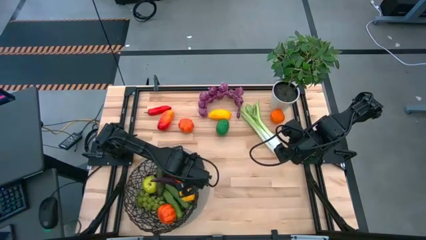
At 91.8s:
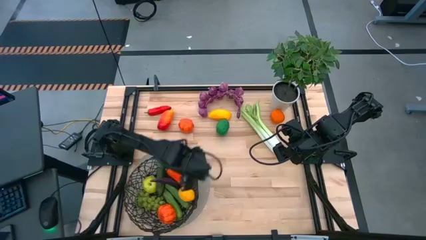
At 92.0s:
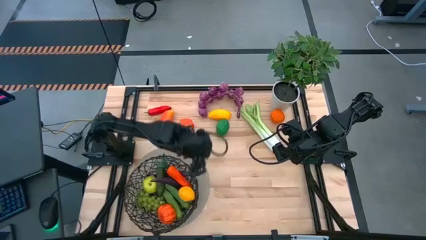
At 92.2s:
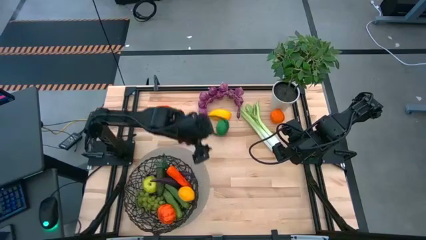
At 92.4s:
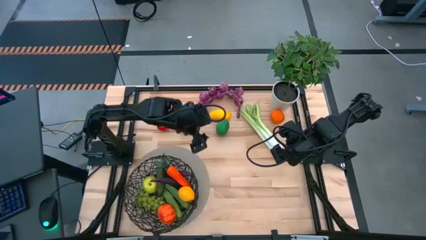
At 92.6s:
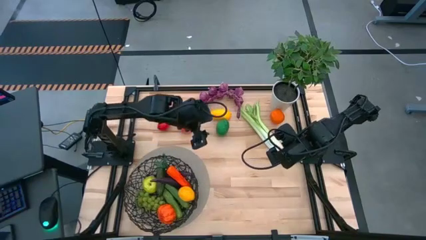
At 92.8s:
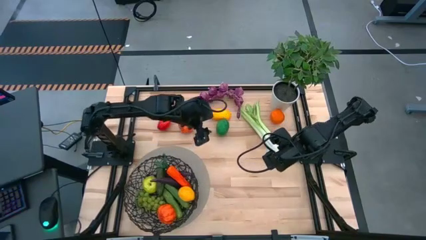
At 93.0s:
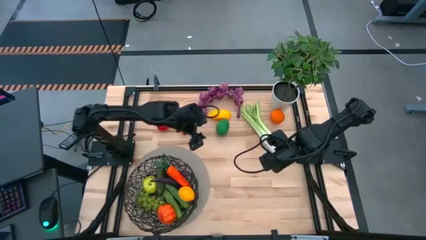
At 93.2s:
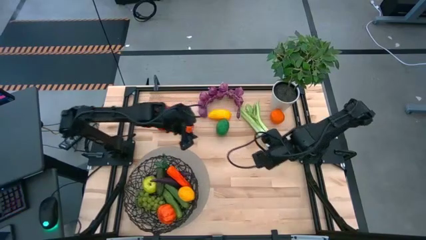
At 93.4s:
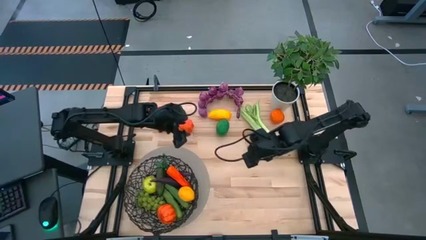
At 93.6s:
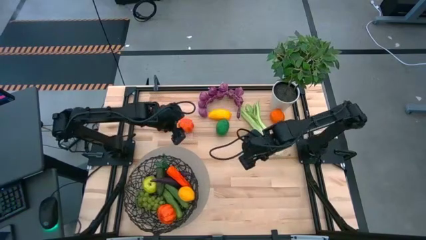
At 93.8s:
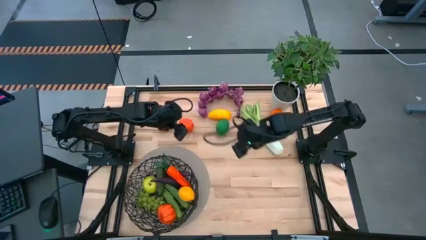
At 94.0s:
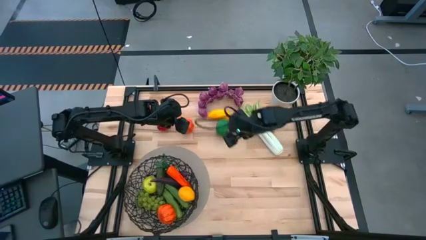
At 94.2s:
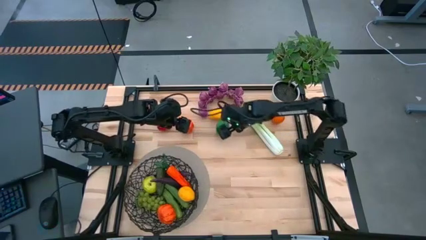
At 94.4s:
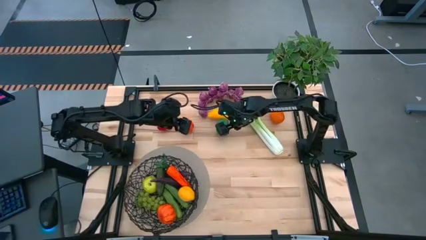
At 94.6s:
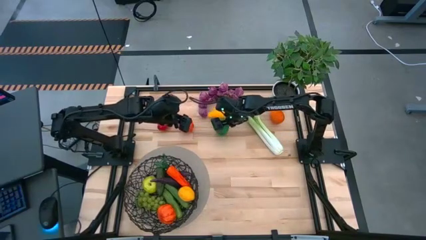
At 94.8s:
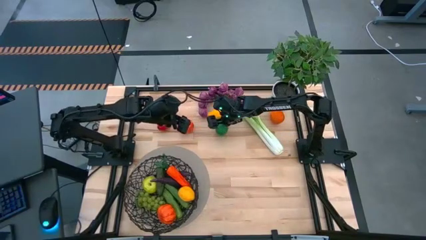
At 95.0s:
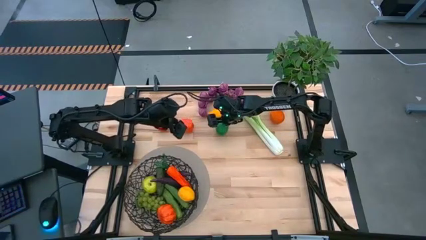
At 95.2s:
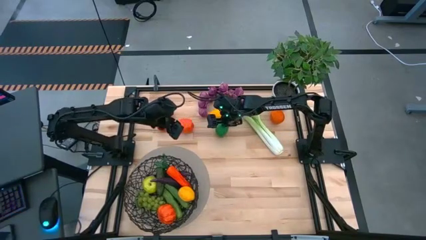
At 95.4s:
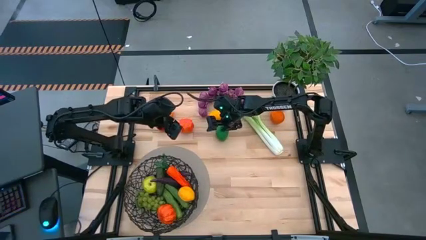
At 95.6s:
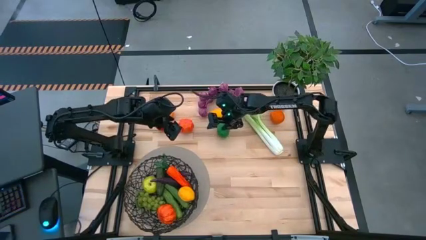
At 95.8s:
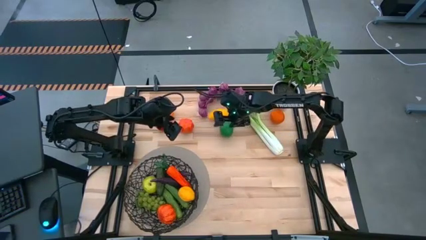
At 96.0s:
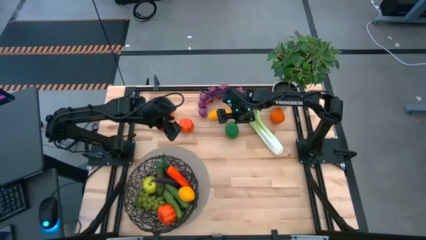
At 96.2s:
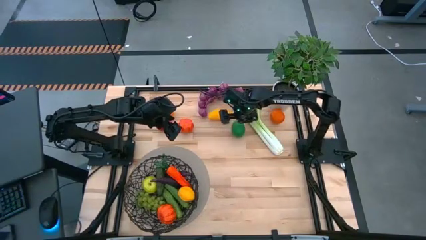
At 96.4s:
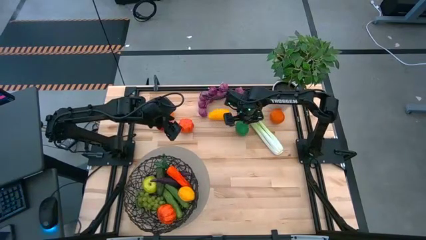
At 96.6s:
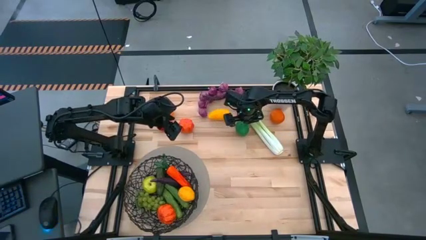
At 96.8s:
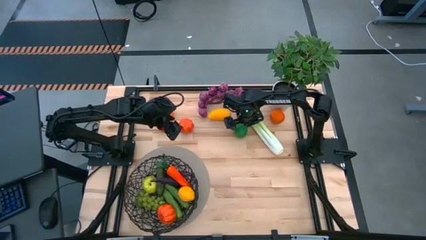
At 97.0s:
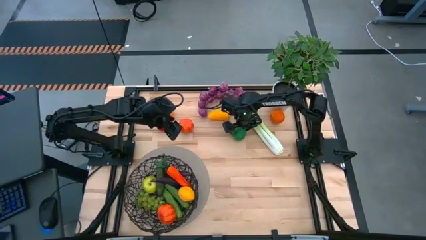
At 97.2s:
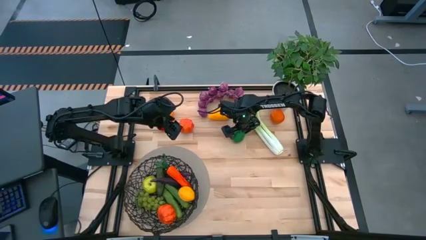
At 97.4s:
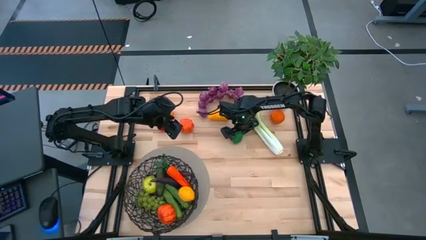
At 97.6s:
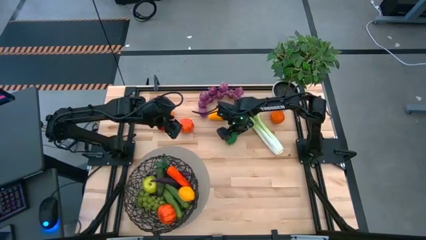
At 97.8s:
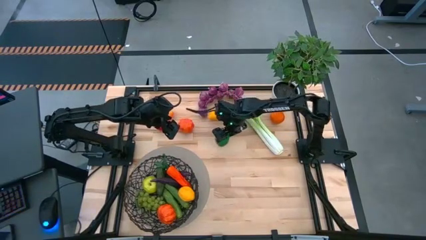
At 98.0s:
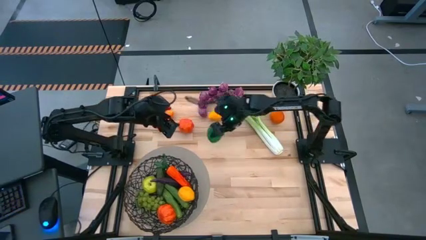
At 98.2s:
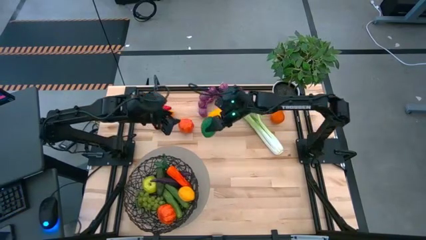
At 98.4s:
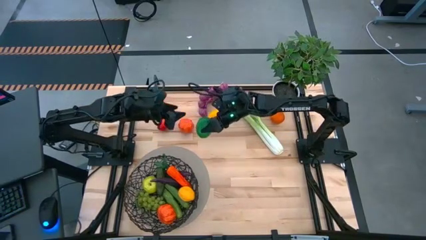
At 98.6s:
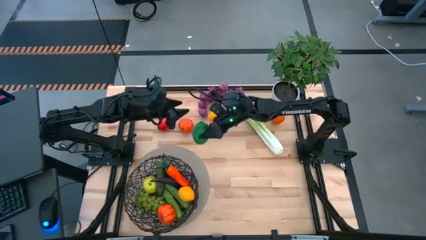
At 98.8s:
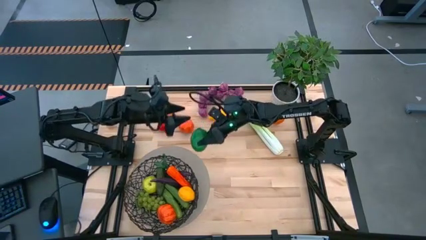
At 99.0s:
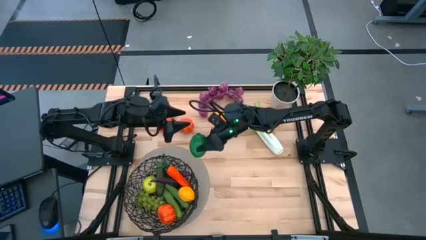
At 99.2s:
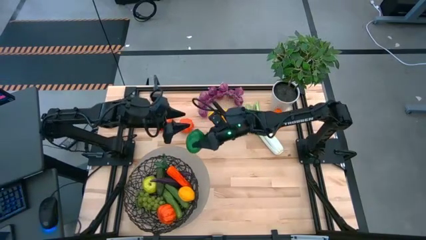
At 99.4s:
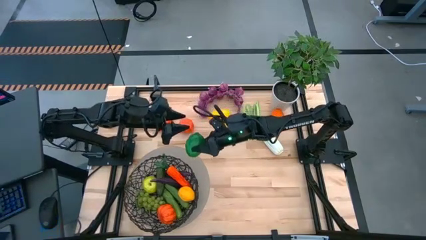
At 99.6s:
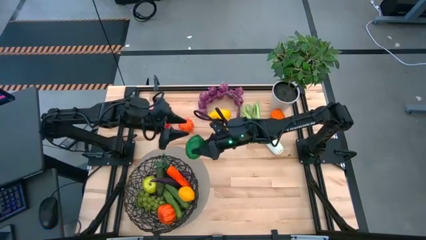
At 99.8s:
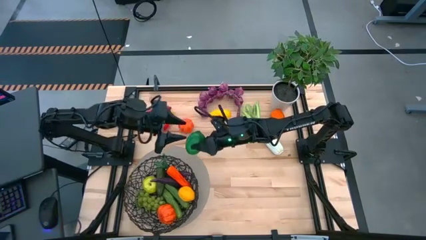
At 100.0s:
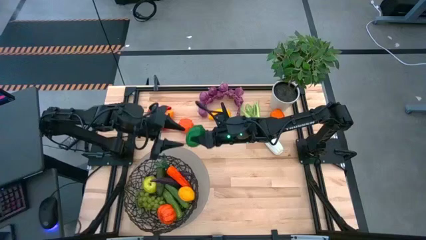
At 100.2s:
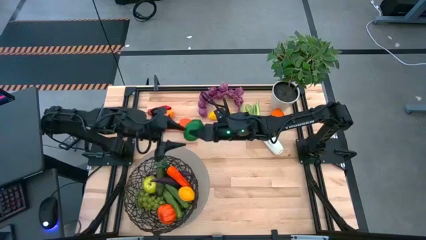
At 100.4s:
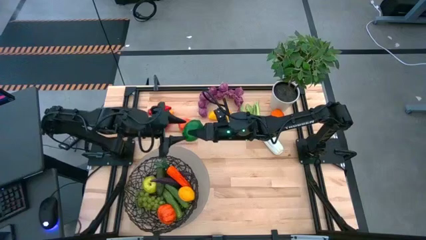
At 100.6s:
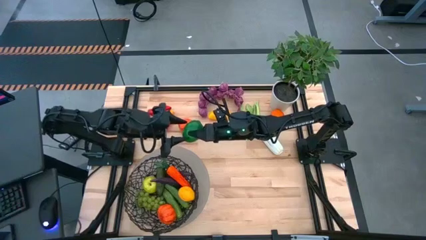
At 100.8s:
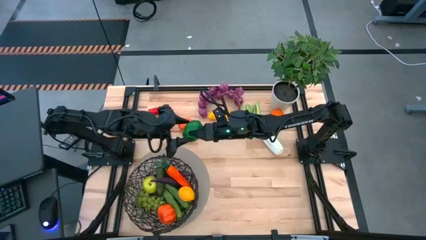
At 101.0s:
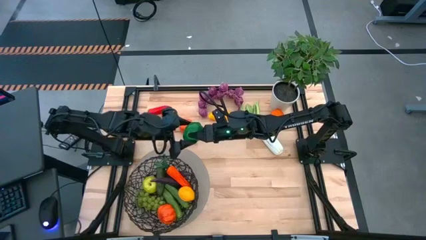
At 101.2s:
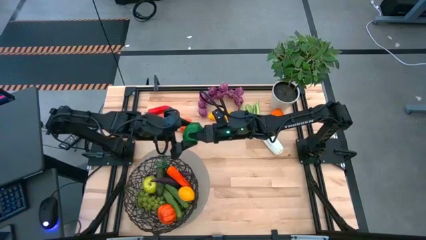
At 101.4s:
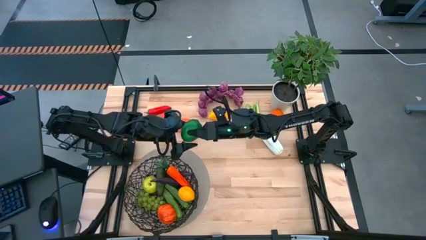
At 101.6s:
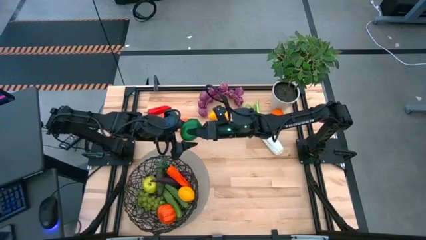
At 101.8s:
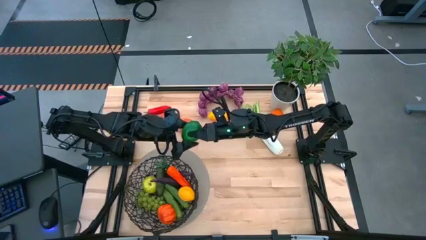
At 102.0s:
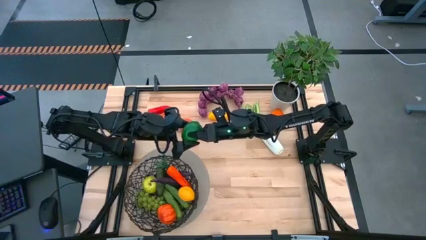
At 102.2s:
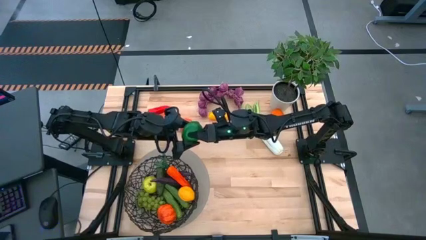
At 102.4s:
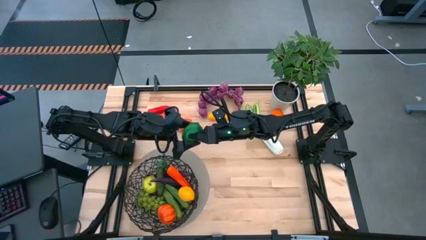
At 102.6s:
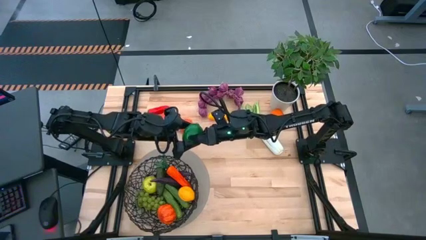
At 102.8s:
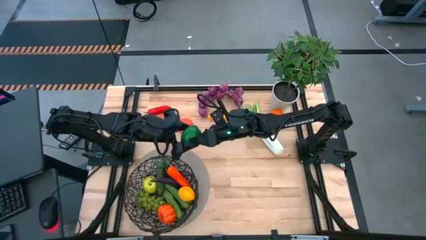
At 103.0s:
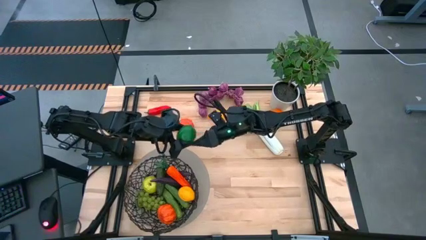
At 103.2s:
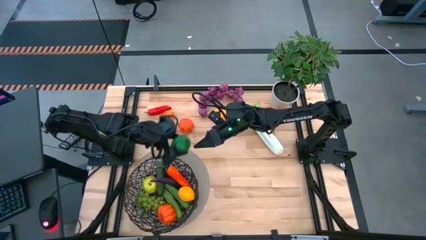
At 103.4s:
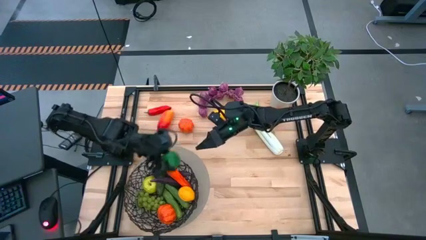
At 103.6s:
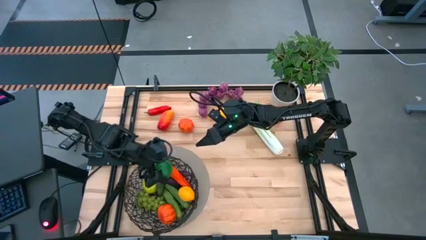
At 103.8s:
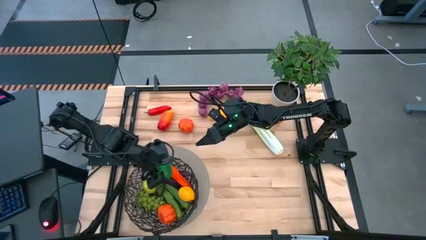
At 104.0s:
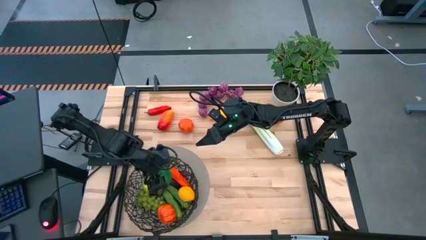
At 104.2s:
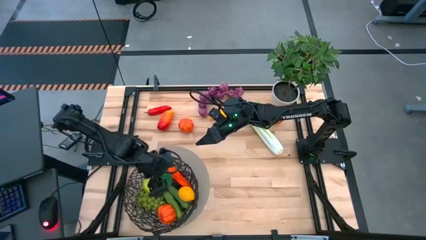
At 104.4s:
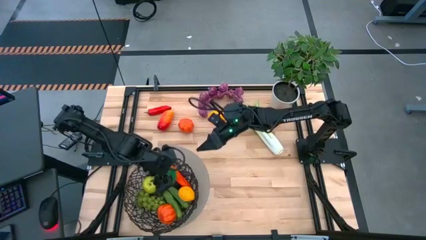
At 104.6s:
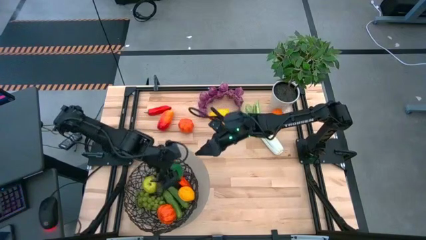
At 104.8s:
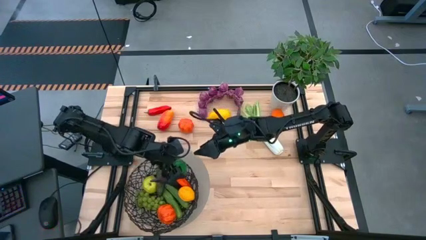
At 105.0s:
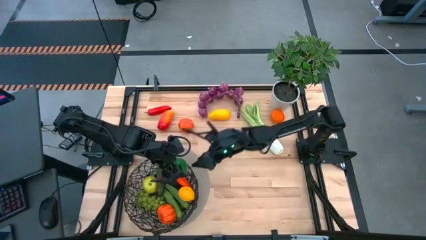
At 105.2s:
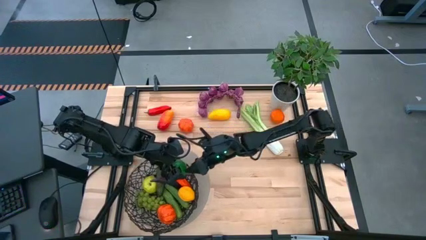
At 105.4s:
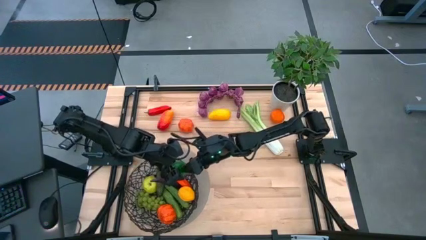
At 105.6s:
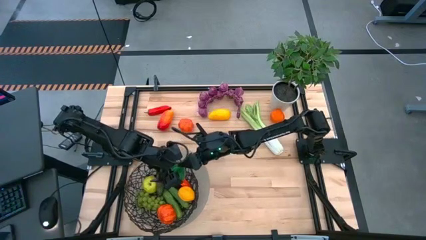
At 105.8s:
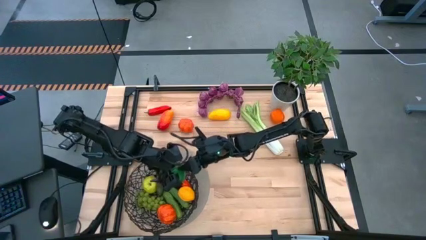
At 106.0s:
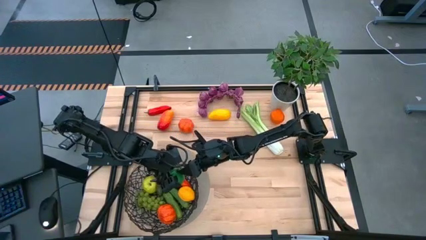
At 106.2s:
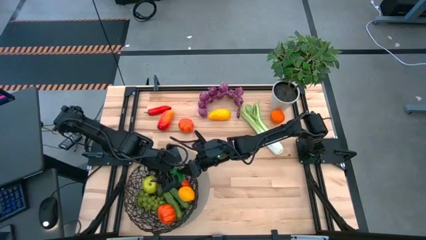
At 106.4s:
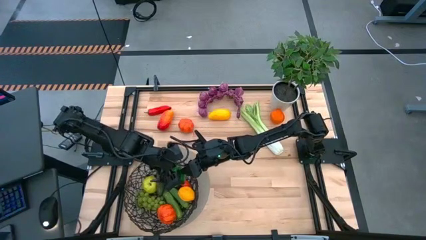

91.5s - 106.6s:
Task: Build produce basket
Put the green lime into the black basket
